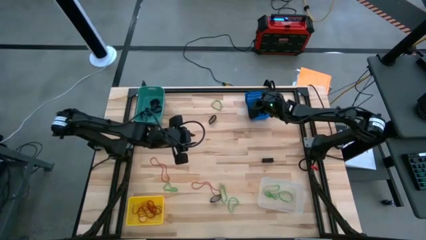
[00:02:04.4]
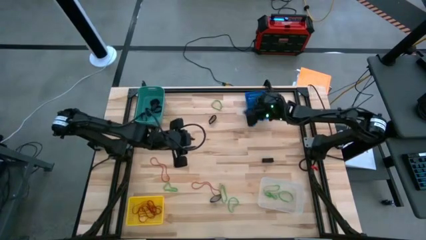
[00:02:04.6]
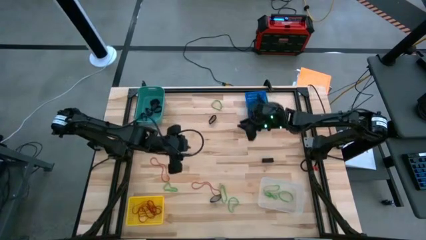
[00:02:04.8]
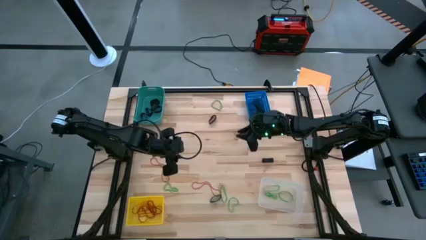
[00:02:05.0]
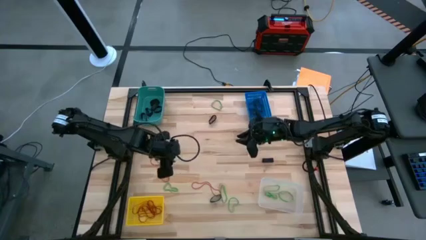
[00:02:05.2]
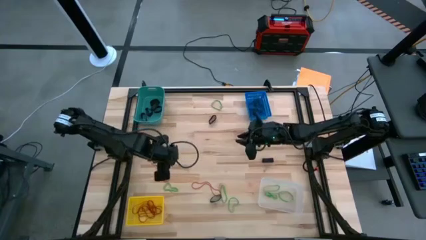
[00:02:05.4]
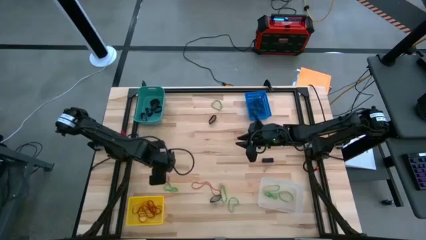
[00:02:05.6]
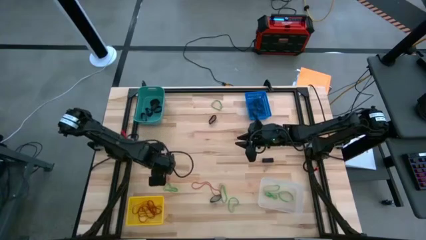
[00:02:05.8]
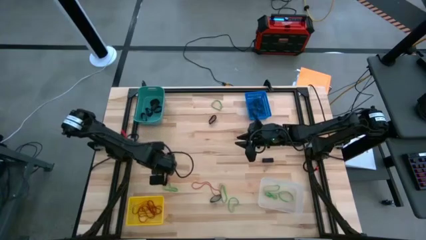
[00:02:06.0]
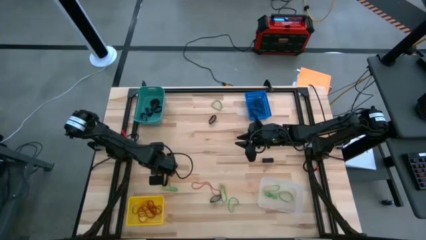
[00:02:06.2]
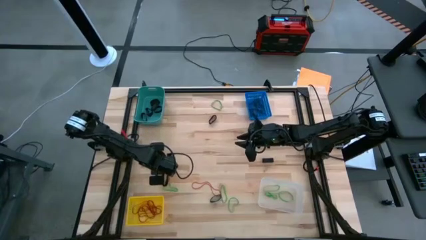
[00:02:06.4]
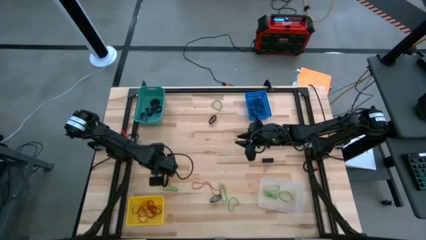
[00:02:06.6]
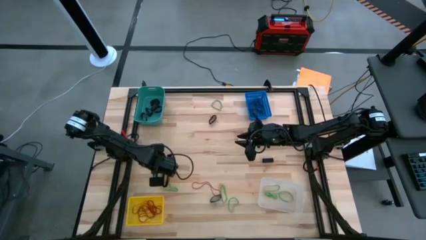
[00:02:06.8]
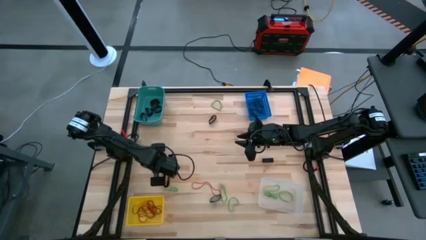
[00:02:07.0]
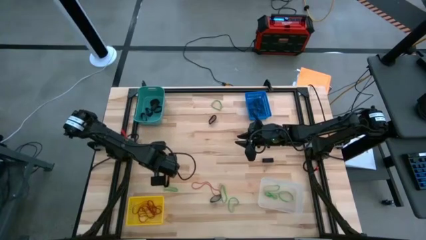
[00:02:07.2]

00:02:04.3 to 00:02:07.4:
Task: Sort rubber bands into baskets
Put the red rubber band into the yellow basket

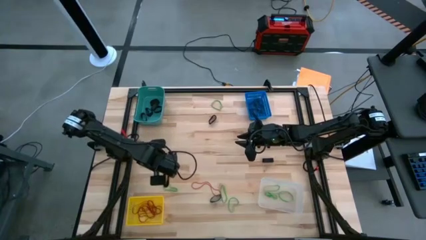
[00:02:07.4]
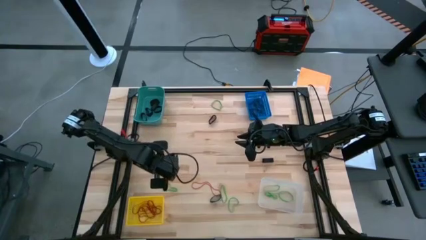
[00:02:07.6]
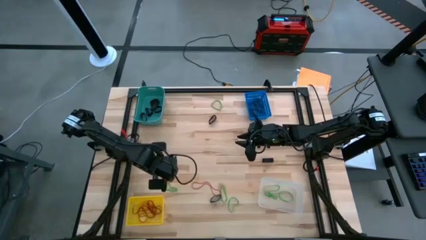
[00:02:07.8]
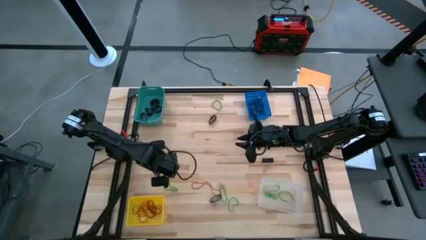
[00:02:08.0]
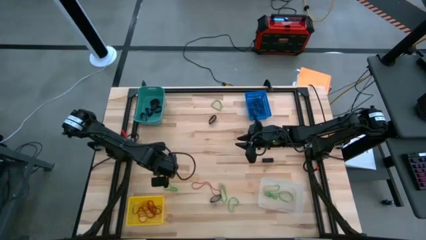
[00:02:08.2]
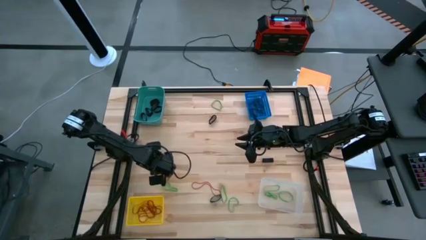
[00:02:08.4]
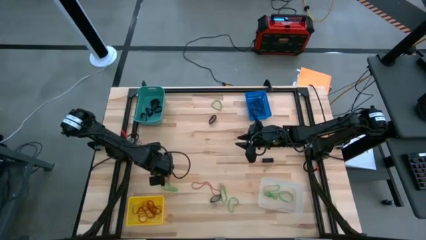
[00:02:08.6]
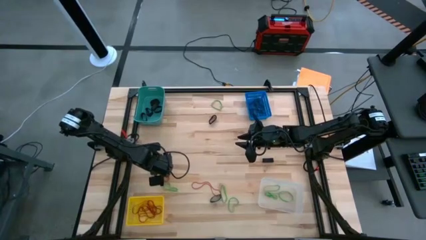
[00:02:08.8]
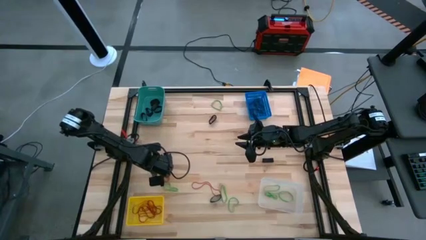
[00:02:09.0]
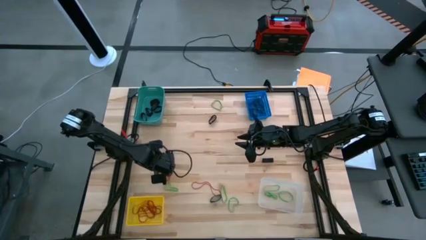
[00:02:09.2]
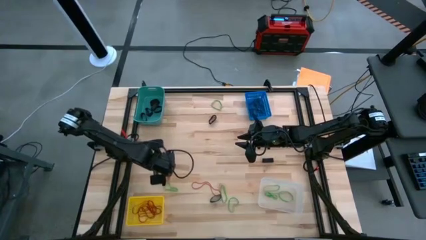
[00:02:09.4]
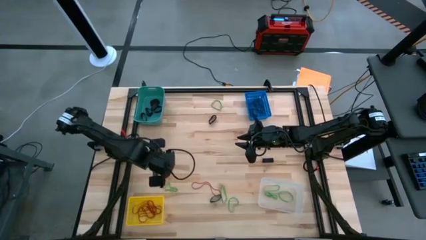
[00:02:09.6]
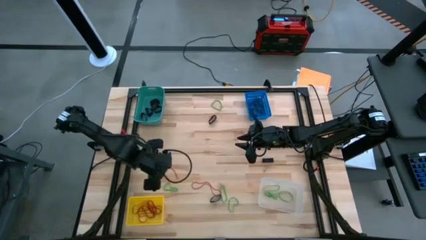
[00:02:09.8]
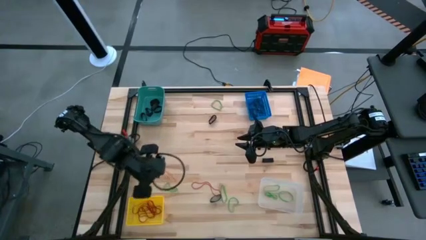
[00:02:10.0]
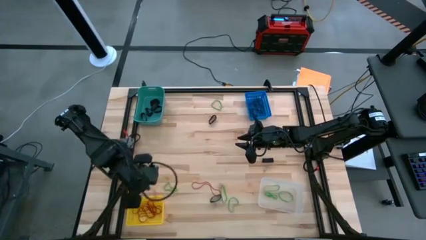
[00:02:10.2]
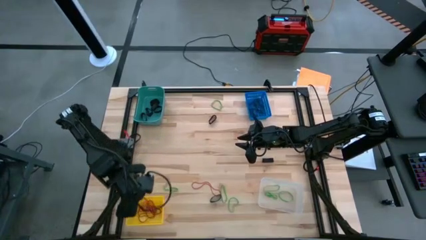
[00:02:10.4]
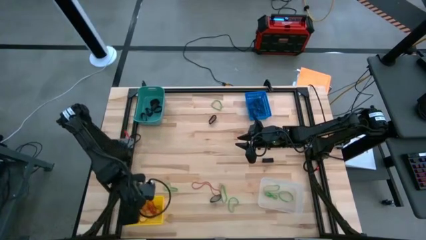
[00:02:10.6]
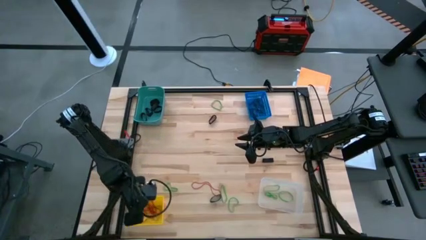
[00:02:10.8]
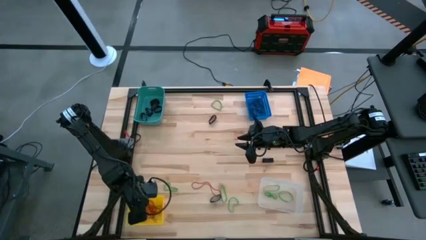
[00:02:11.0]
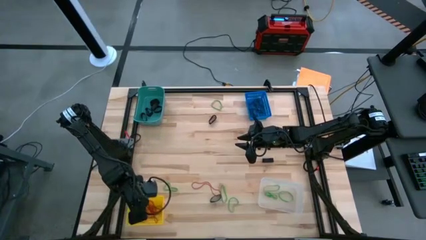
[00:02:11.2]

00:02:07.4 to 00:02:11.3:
Put the red rubber band into the yellow basket

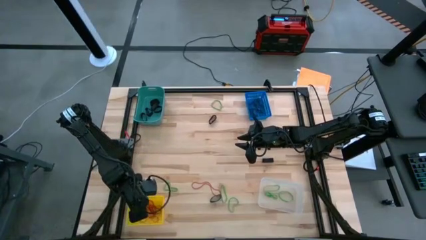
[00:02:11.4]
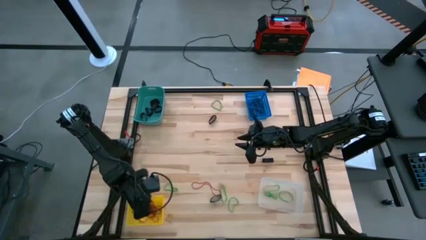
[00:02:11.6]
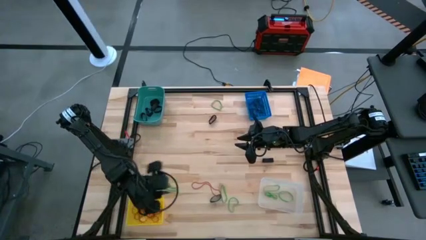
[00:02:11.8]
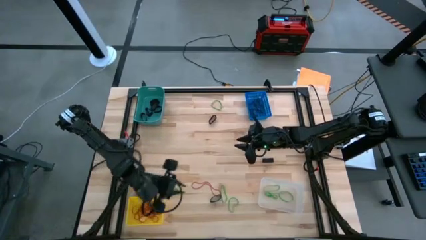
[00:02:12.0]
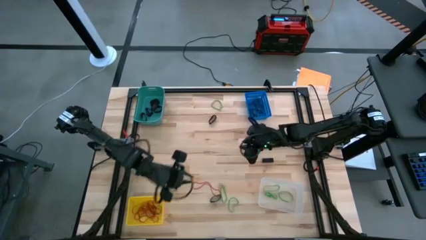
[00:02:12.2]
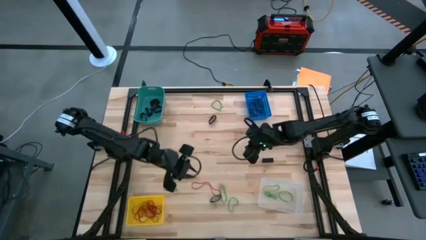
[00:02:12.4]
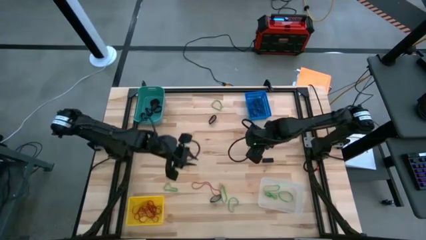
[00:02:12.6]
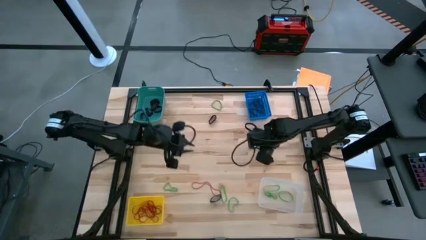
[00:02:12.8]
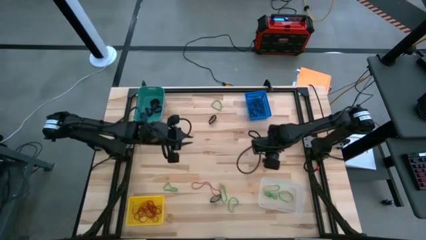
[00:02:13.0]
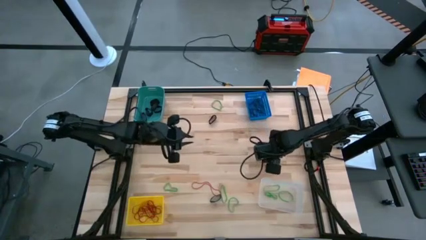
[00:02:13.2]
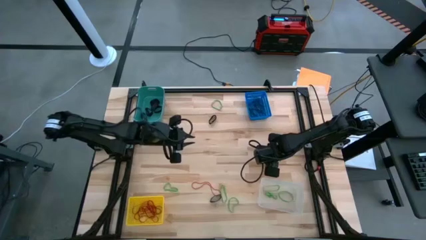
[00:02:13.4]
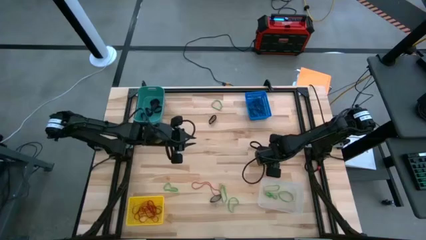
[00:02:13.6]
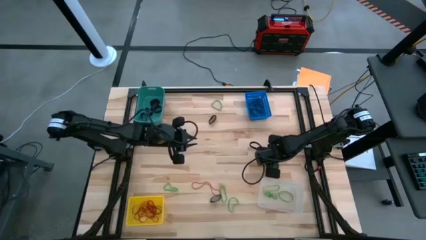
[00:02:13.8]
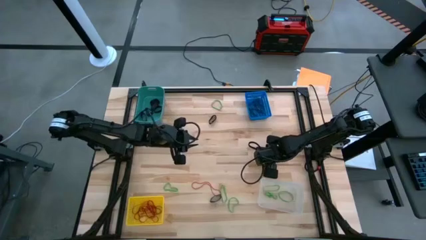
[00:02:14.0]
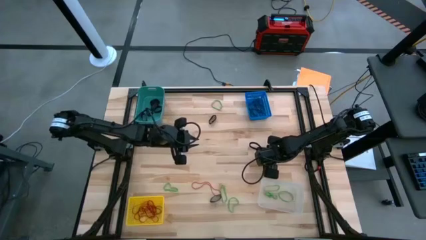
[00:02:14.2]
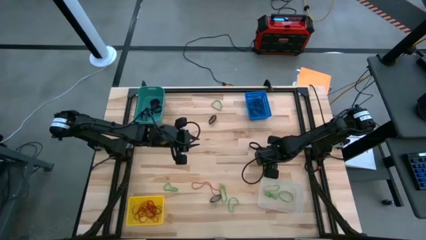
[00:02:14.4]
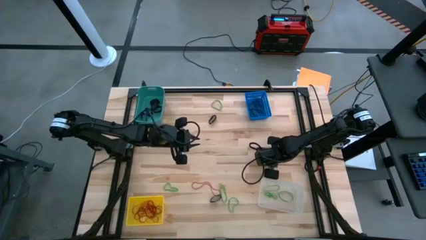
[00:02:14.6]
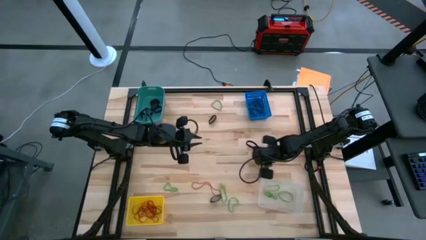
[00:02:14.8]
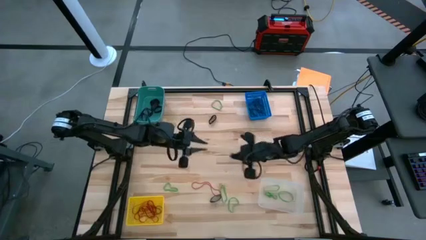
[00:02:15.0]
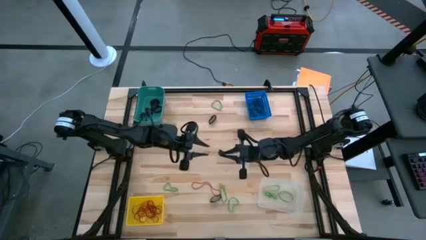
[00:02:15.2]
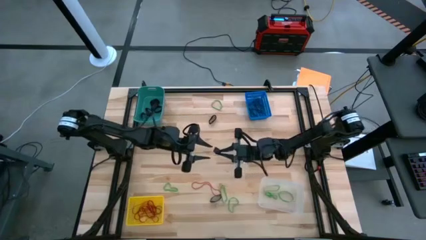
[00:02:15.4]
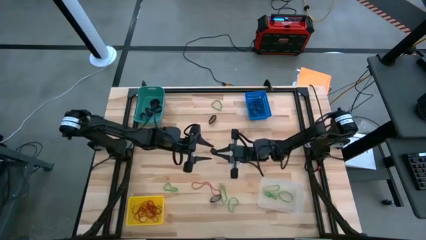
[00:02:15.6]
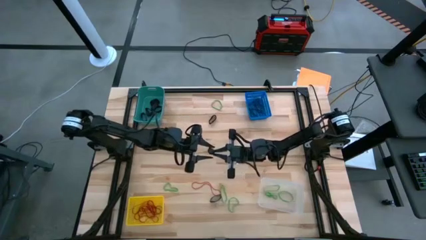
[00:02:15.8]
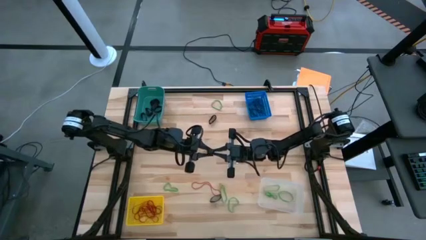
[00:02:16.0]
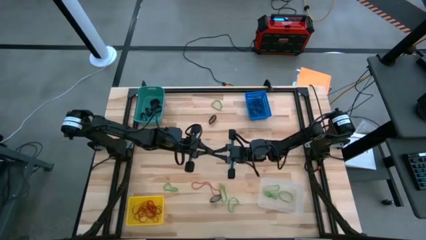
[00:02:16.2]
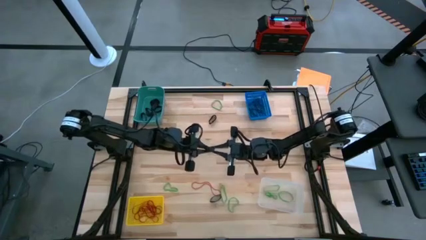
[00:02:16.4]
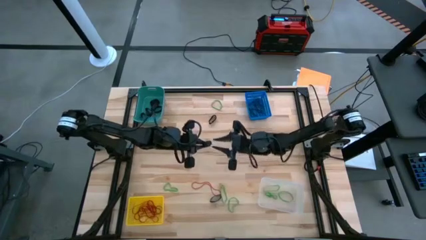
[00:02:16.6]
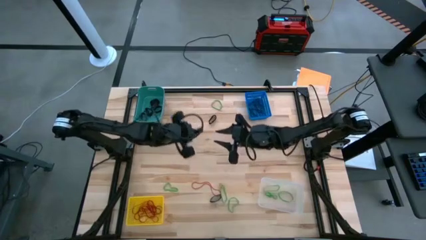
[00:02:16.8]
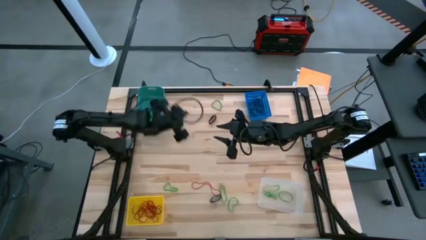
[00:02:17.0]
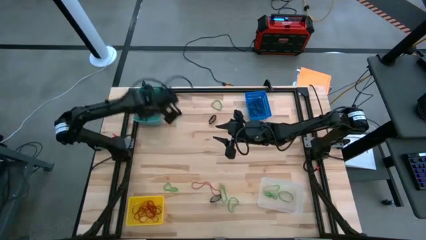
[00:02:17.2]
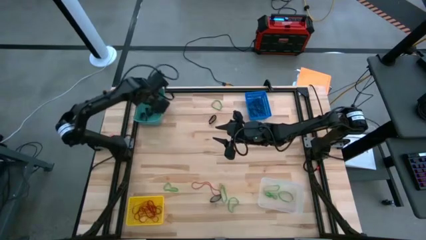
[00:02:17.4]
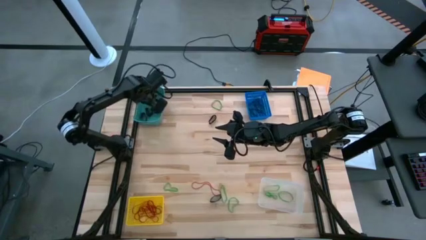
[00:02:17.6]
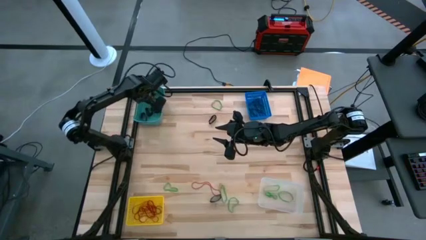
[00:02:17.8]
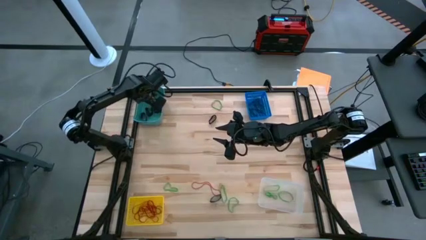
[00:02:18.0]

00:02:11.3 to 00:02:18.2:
Put the thick black rubber band into the light blue bin

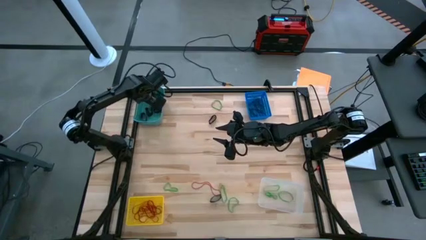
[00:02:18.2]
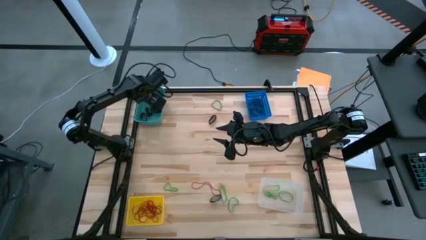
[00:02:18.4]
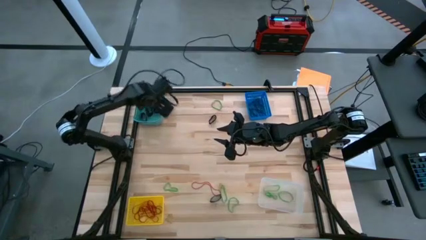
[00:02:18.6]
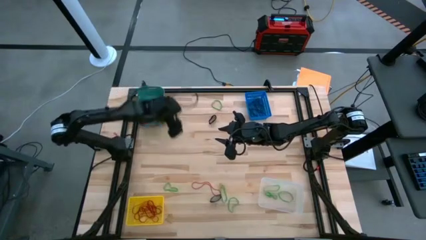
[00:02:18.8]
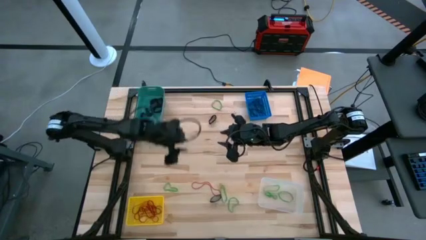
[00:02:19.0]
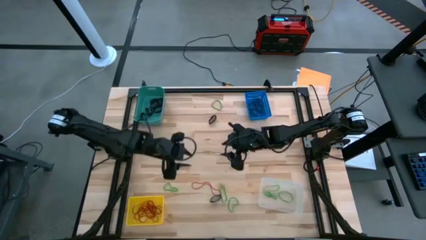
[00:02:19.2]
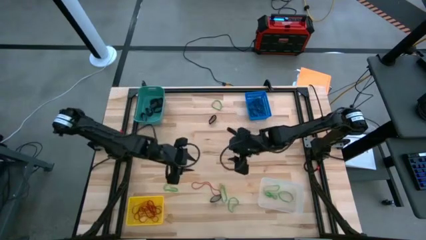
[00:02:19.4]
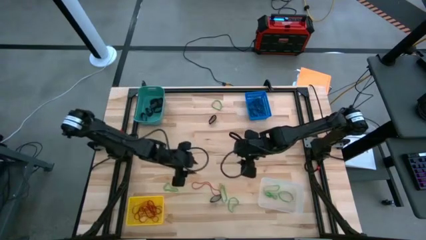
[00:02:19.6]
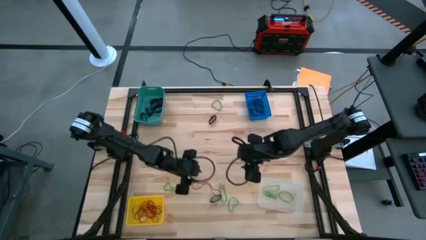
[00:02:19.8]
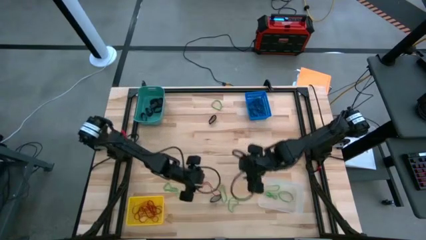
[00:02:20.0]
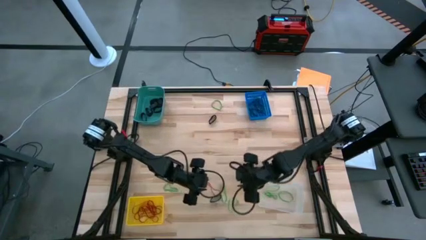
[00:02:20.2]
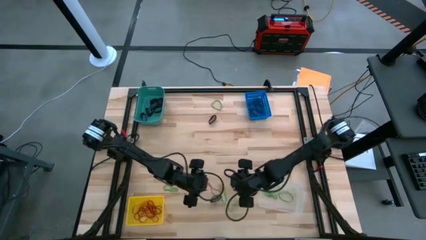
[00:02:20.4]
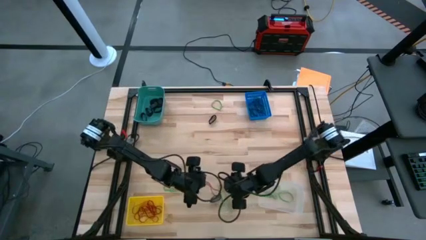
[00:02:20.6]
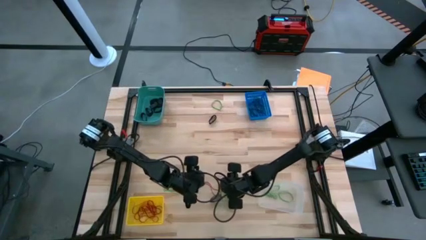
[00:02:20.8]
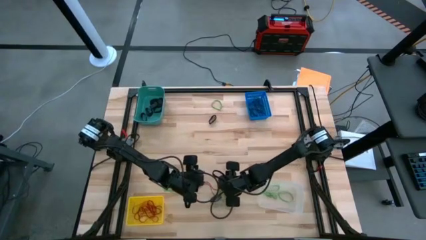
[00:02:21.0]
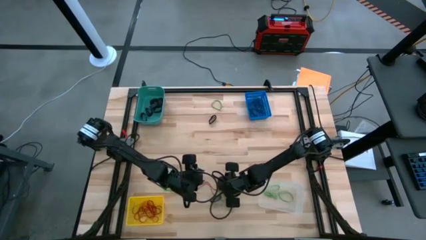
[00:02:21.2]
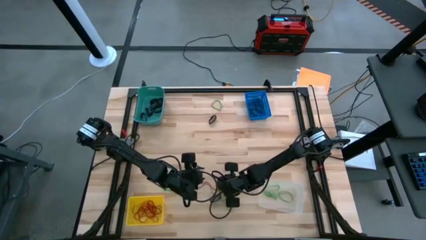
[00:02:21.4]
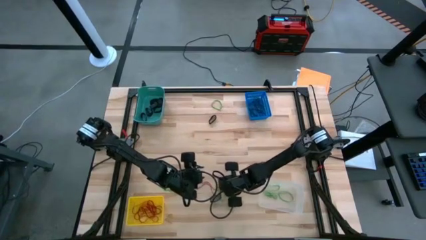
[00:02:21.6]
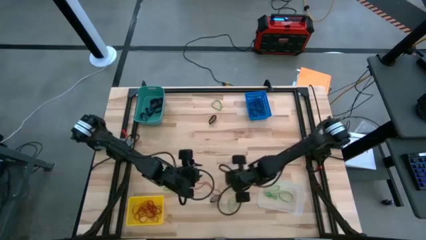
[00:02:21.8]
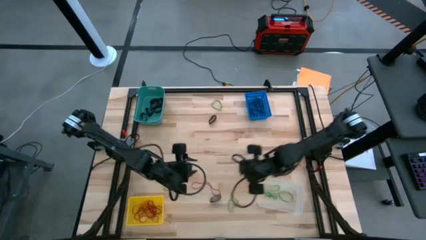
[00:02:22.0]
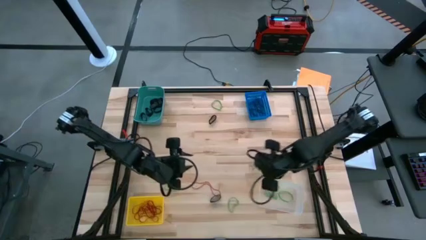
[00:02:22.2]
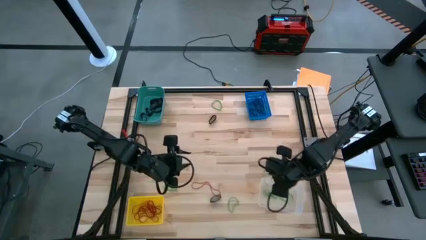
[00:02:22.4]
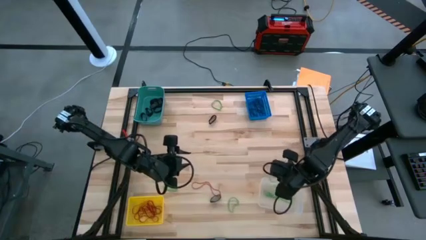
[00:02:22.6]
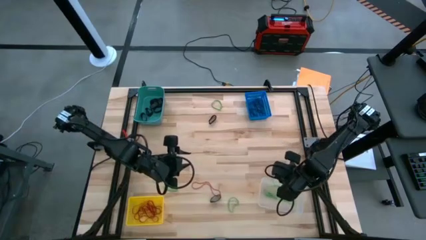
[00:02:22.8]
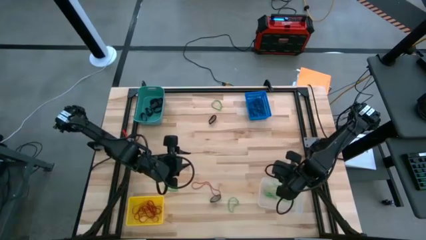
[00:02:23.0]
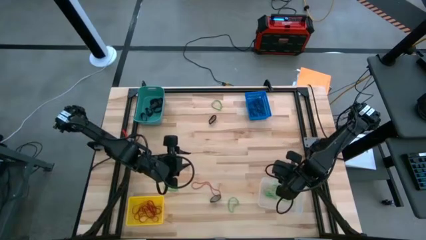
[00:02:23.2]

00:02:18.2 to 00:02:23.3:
Put the green rubber band into the transparent bin
